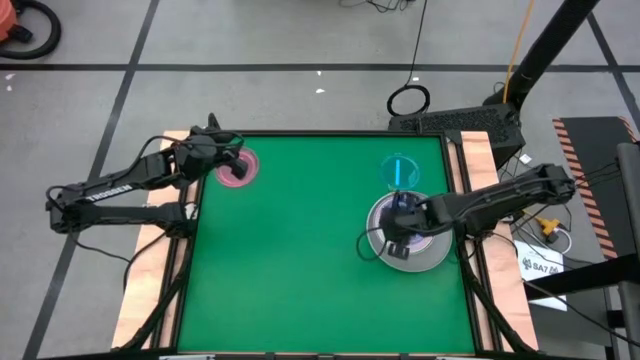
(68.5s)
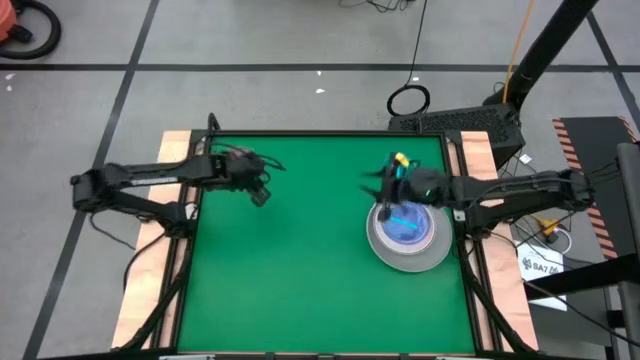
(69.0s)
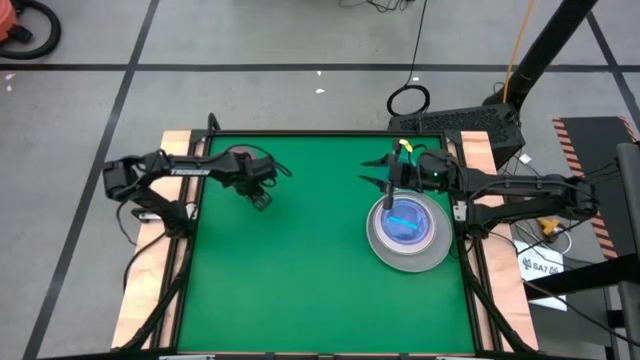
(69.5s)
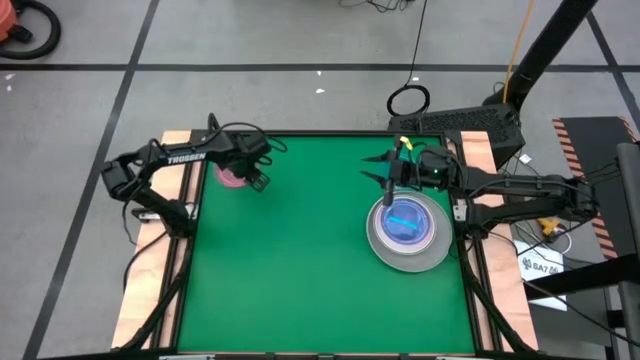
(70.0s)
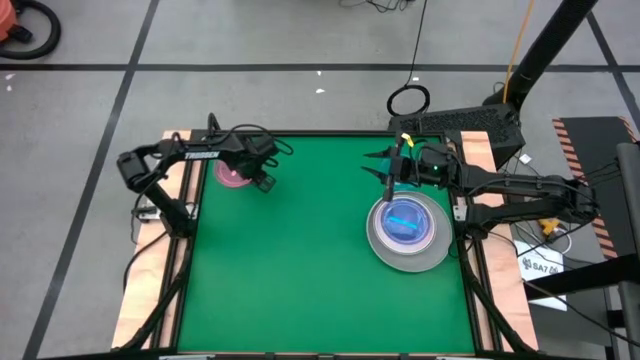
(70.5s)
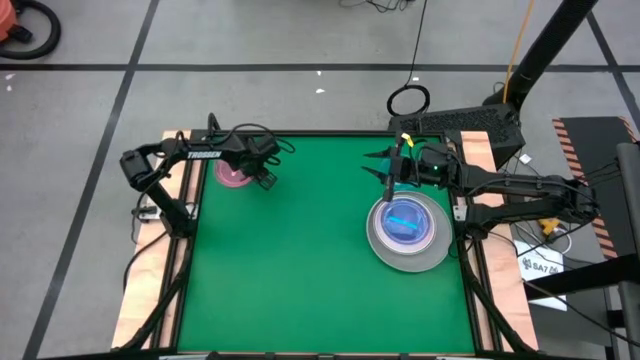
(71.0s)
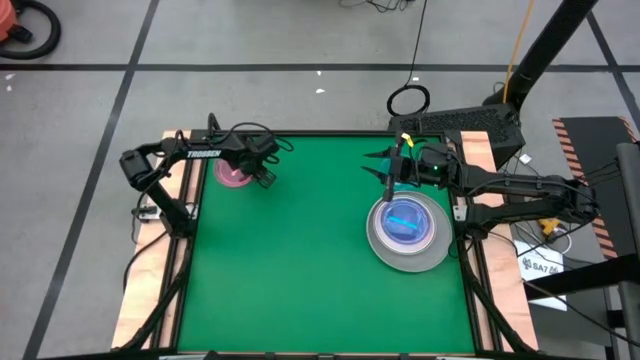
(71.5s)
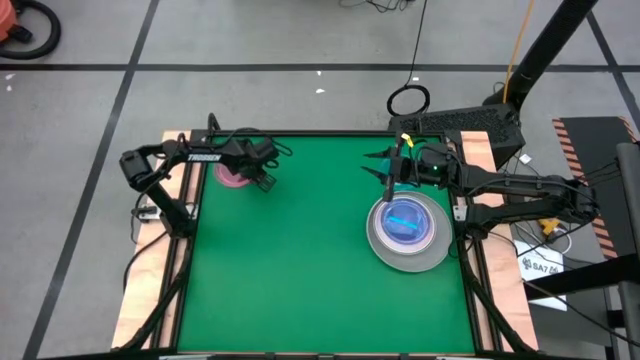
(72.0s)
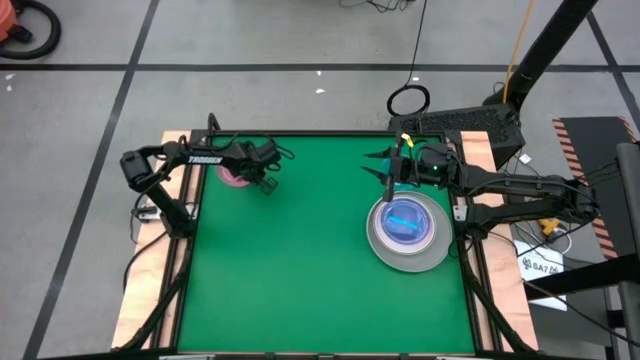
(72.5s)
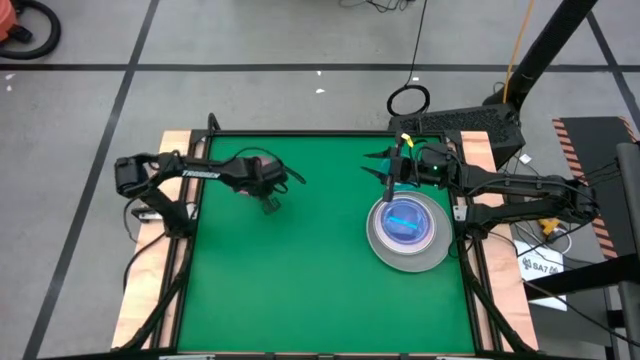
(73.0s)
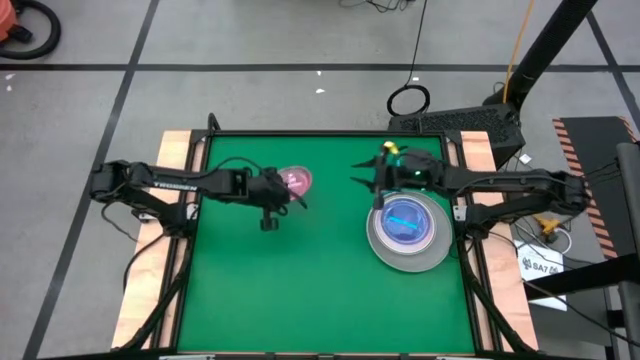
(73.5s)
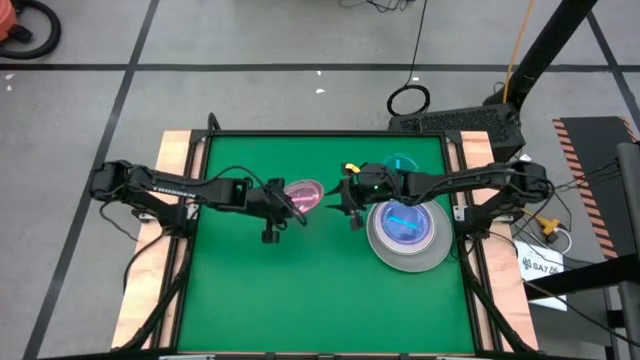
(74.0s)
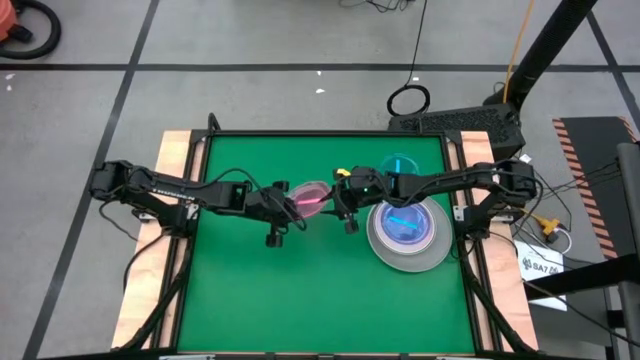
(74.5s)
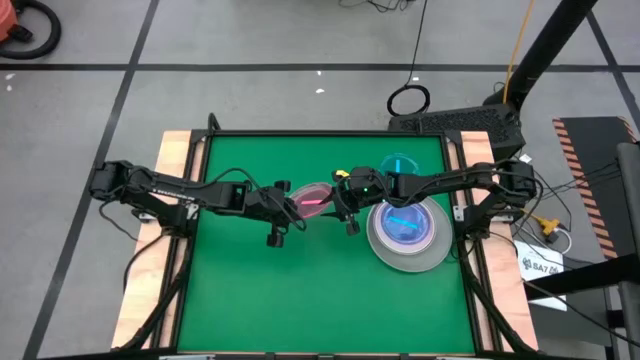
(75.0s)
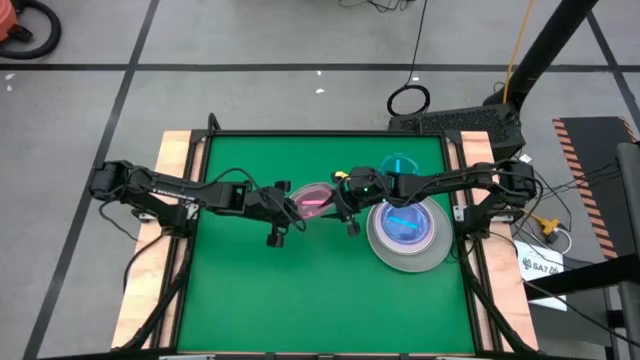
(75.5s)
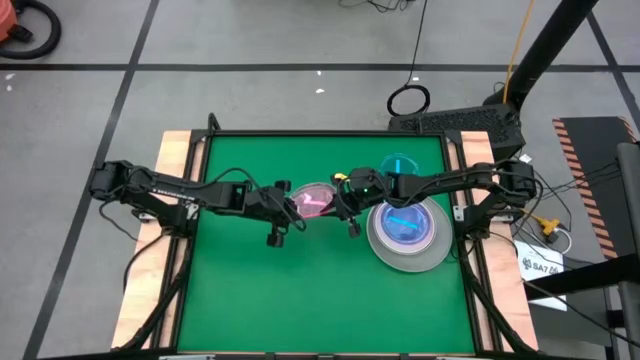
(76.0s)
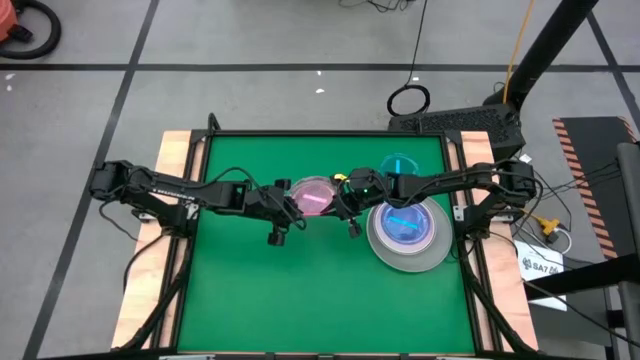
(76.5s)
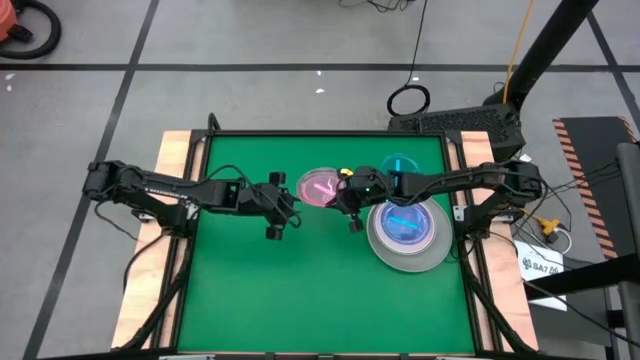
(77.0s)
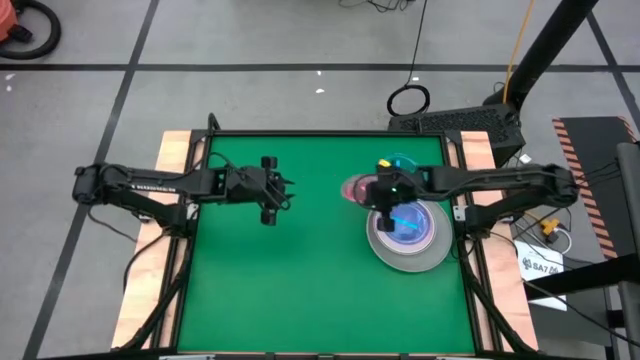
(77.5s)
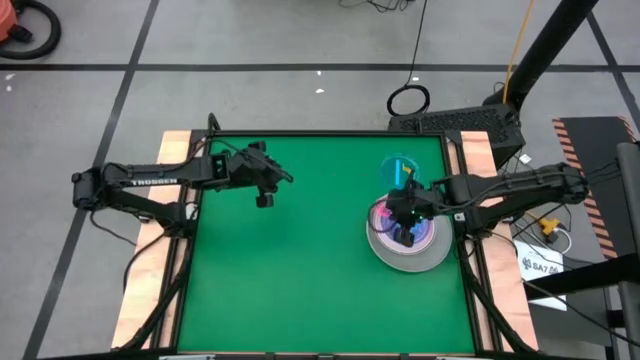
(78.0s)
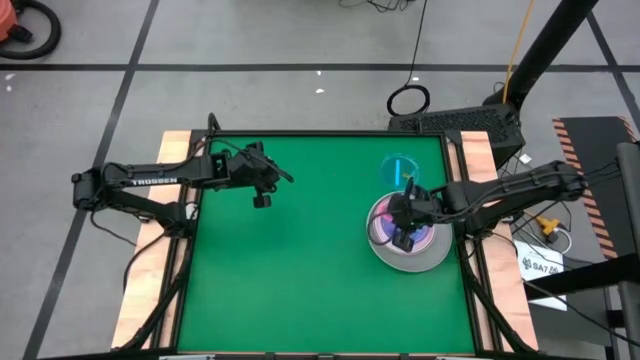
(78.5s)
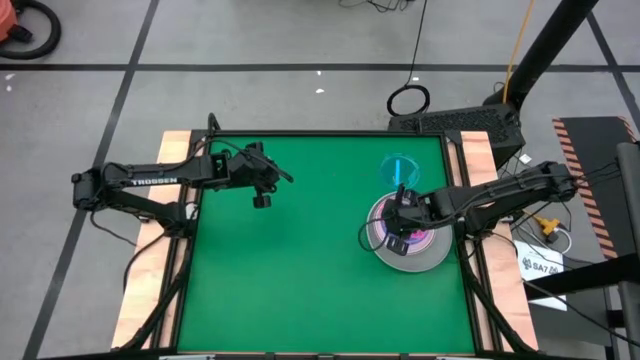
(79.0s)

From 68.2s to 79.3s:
Task: Stack plastic plates
Stack the pink plate on top of the blue plate

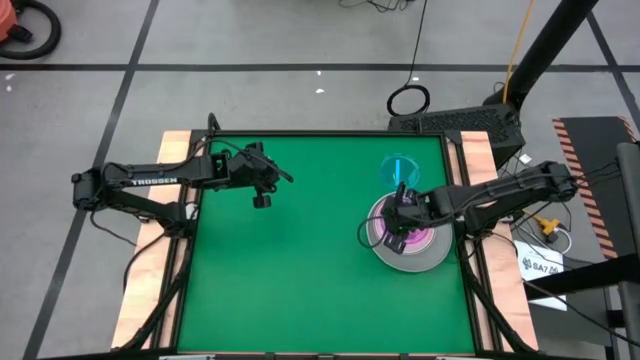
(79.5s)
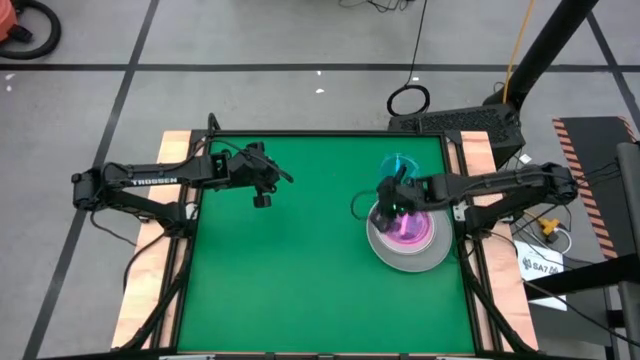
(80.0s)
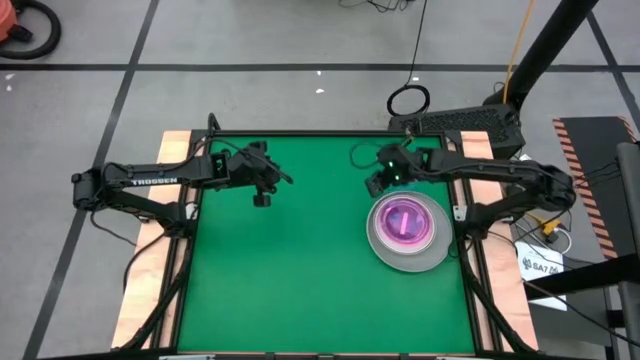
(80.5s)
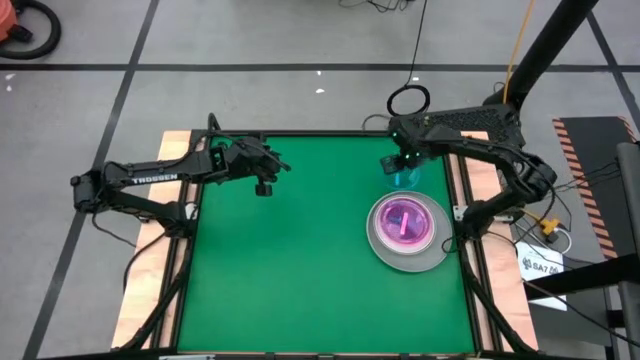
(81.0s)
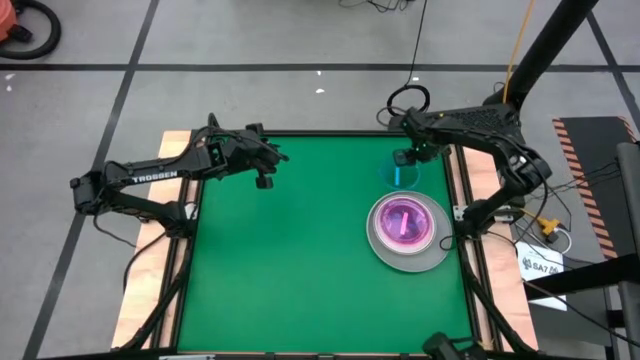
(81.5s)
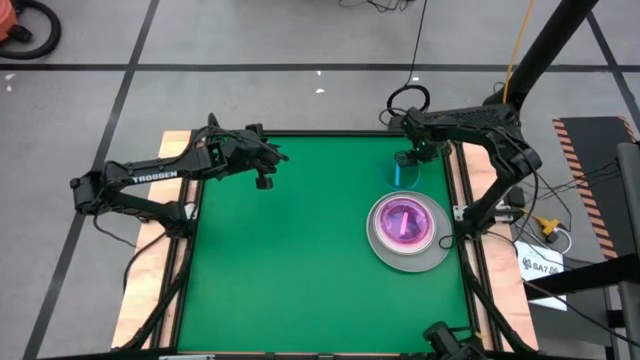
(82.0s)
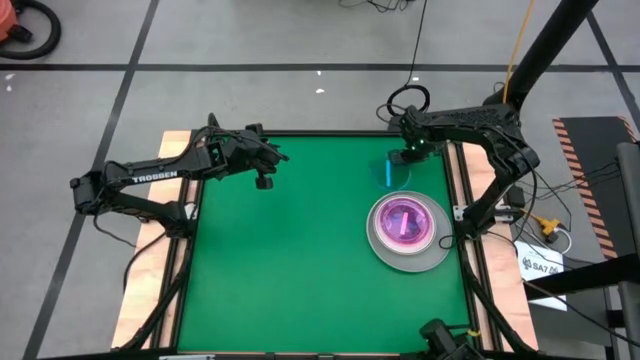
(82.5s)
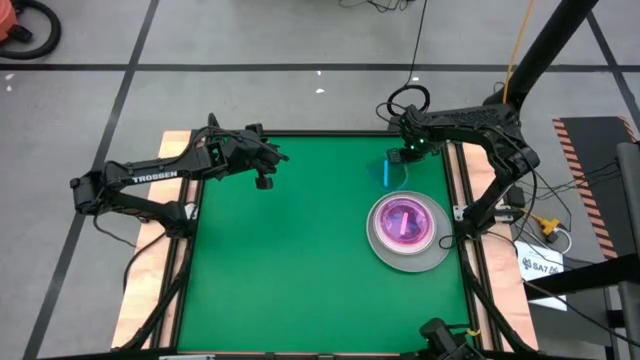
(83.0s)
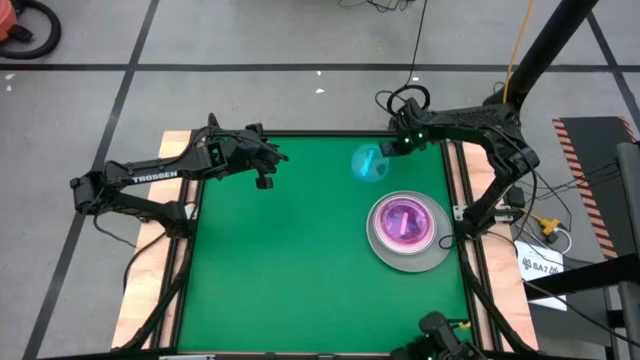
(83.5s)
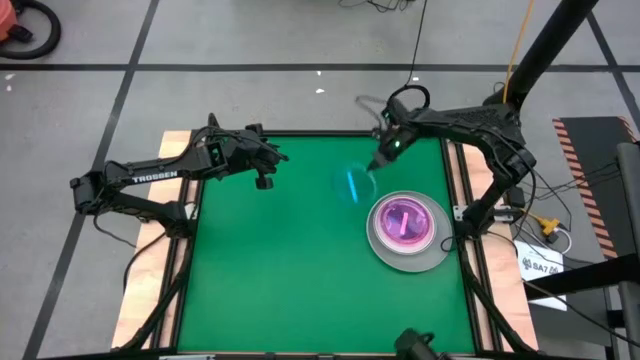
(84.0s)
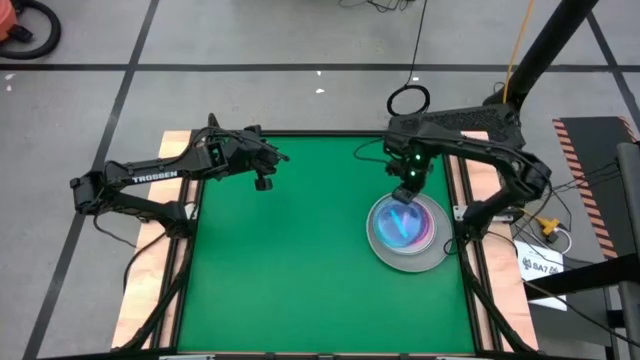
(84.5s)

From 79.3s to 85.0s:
Stack the blue plate on top of the pink plate

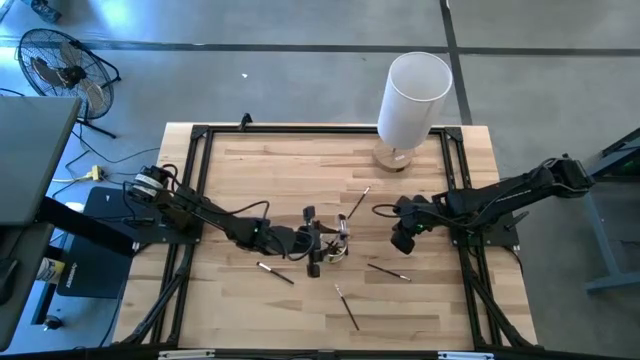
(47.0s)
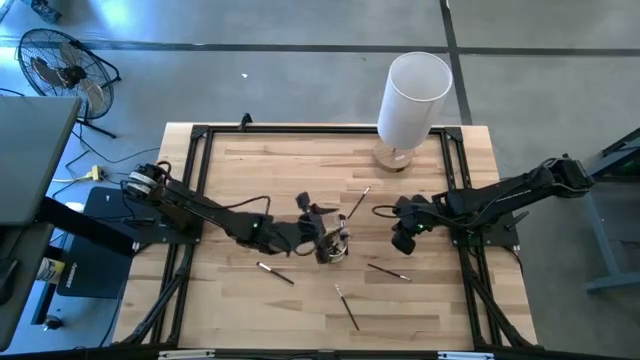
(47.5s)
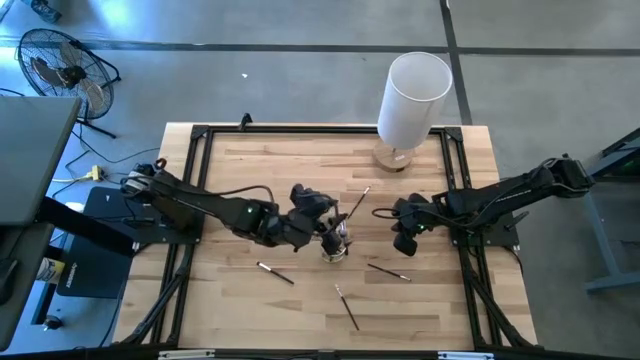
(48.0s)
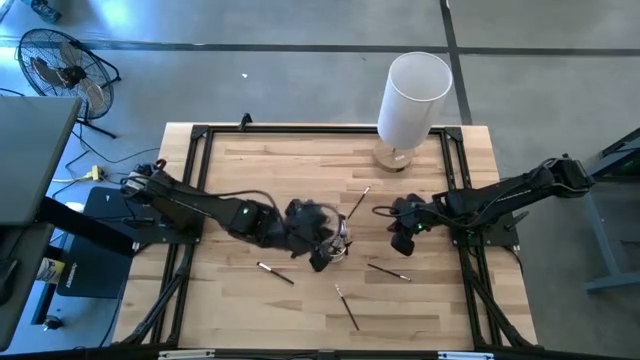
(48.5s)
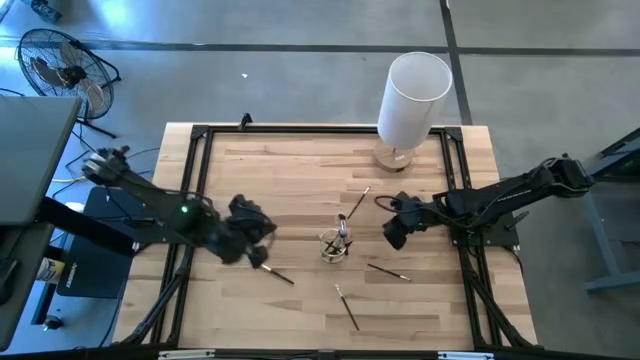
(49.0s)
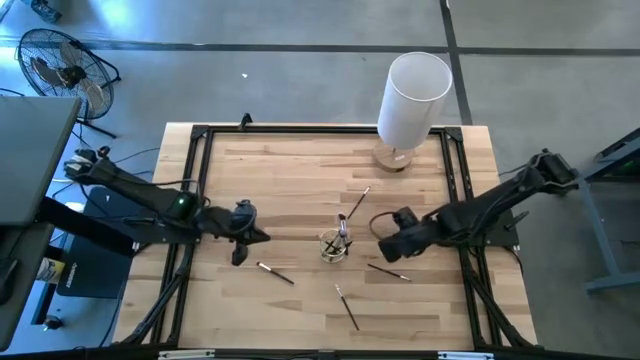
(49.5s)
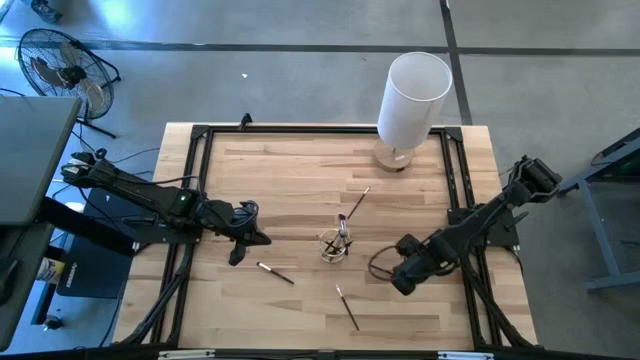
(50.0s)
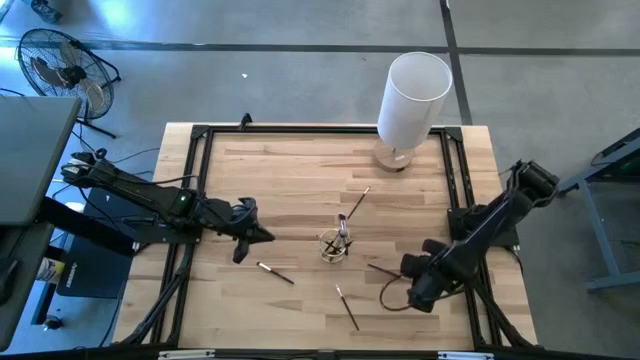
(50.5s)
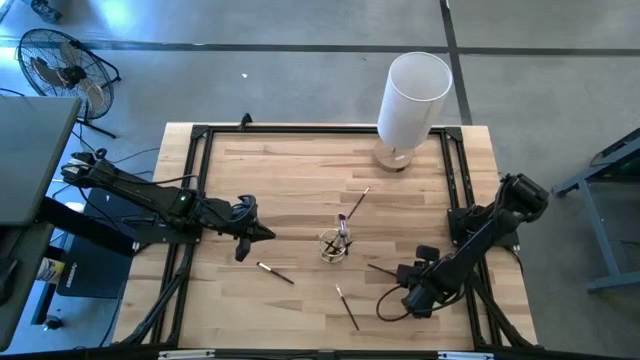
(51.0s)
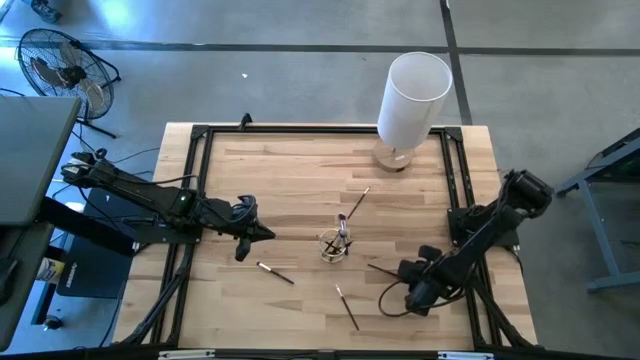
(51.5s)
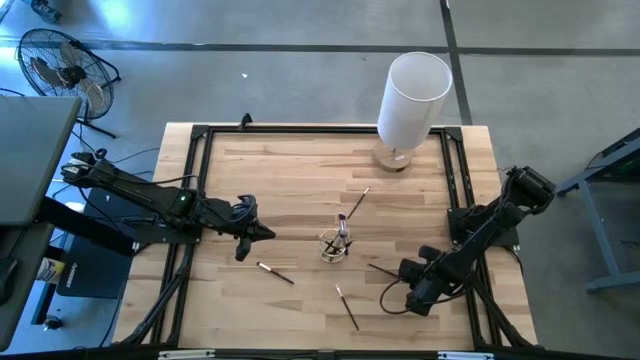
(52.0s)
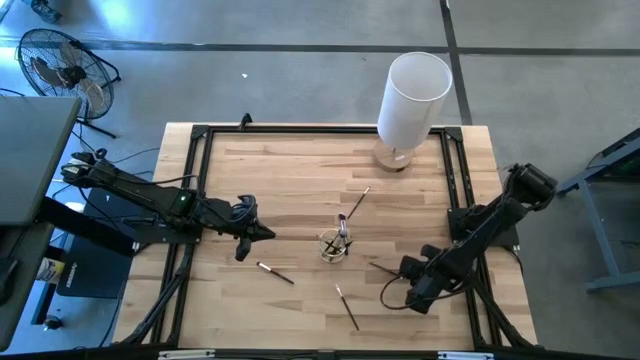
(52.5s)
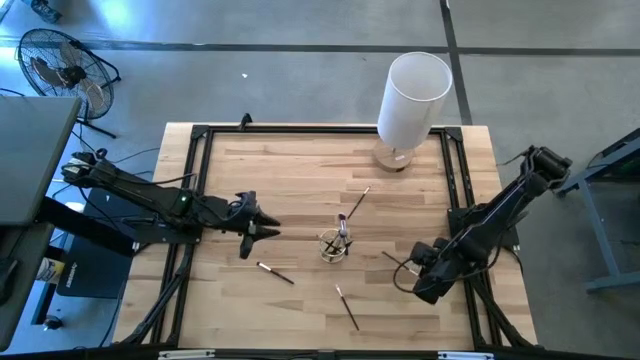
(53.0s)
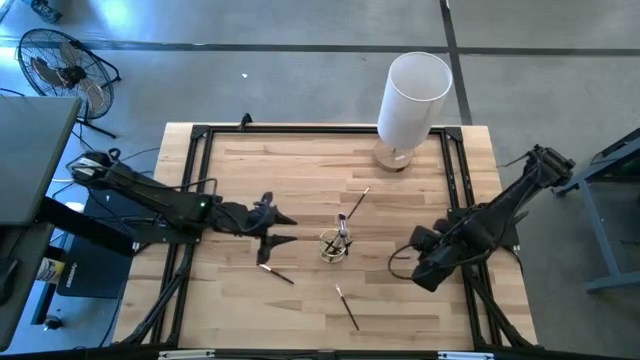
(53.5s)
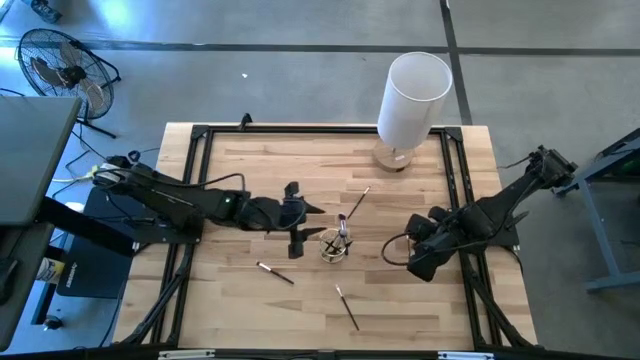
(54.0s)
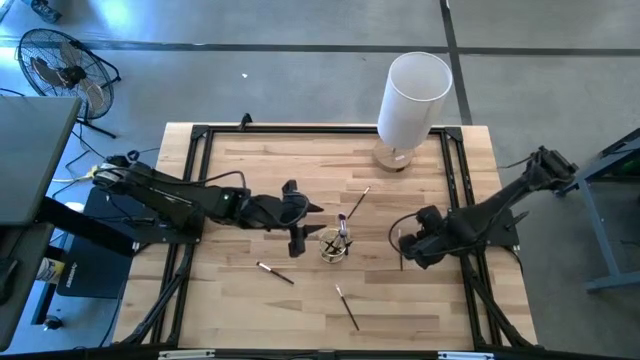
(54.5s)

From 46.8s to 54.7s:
Task: Put items in baskets/containers
Put the eyeshadow brush into the mesh organizer
